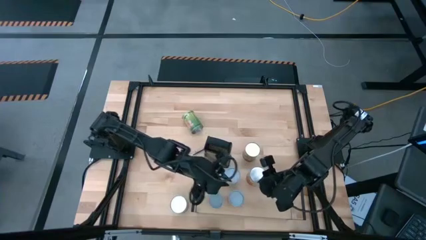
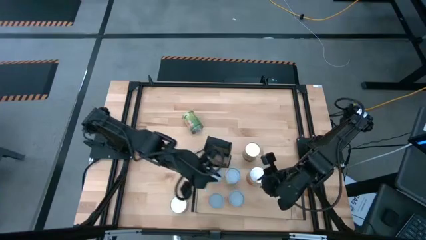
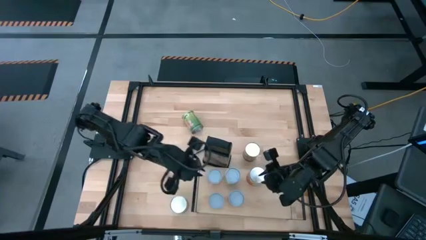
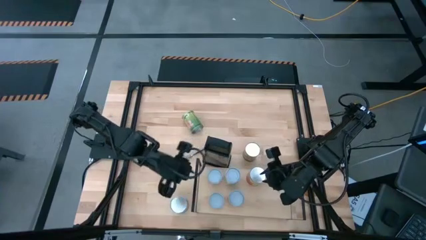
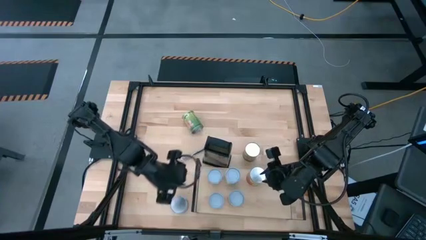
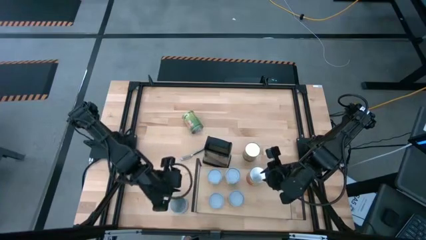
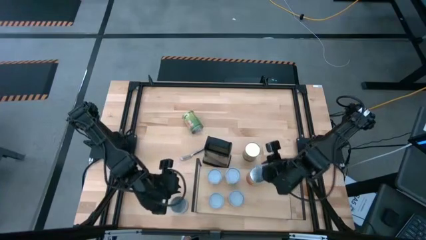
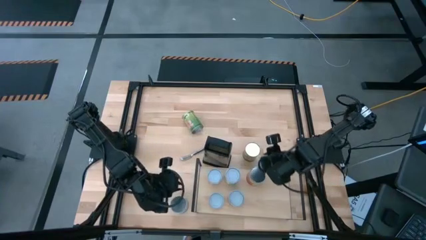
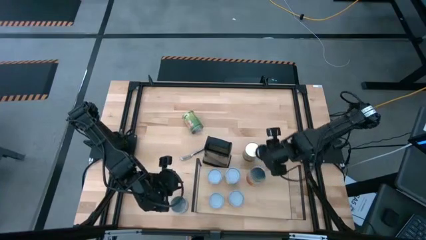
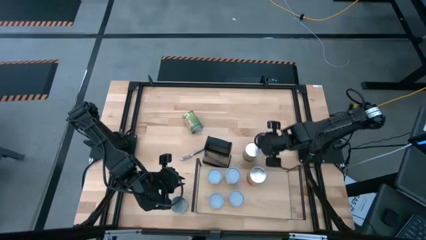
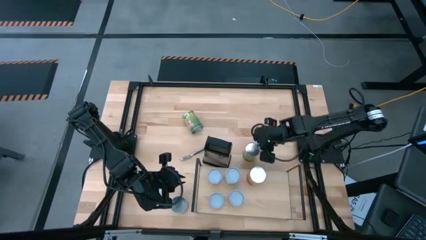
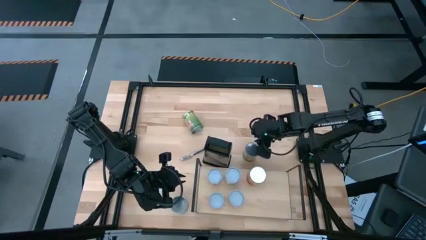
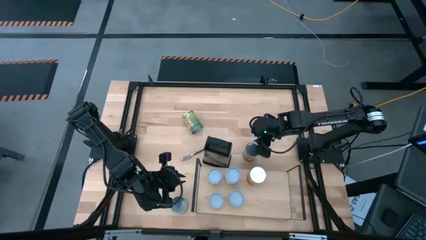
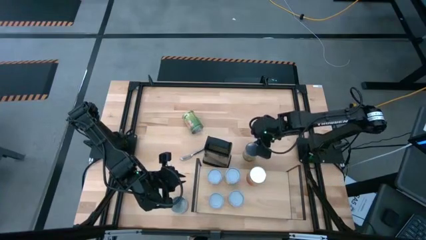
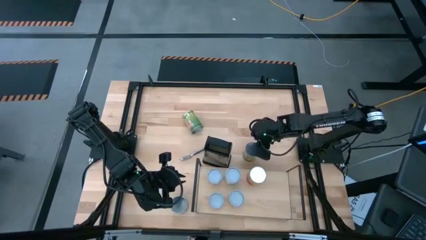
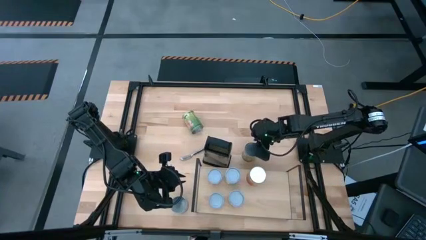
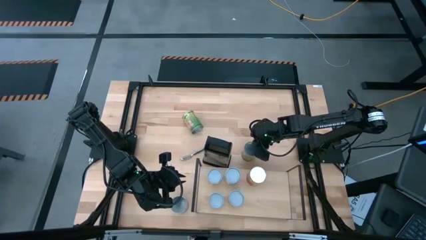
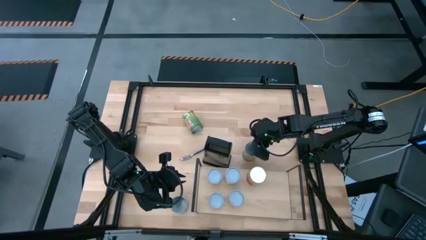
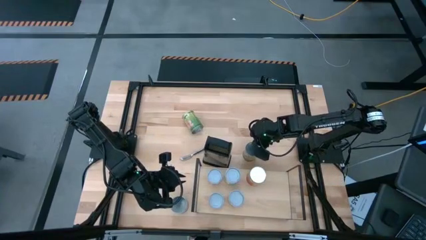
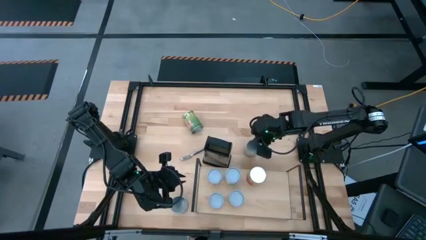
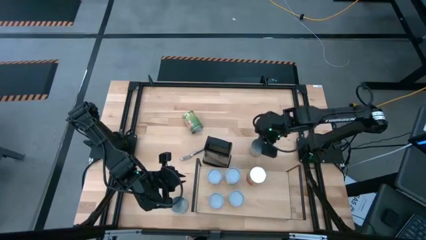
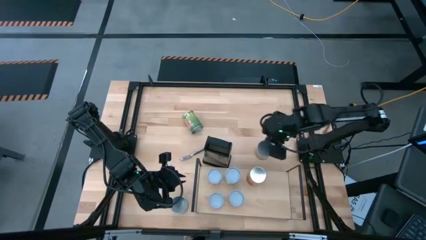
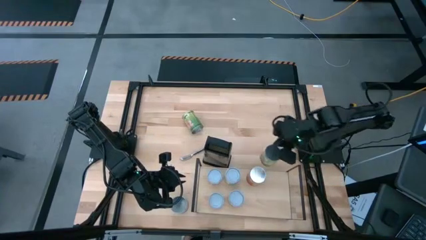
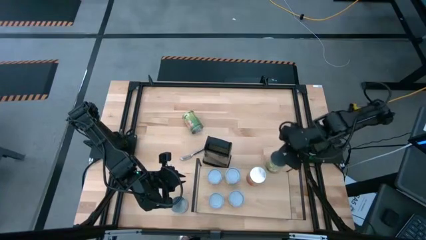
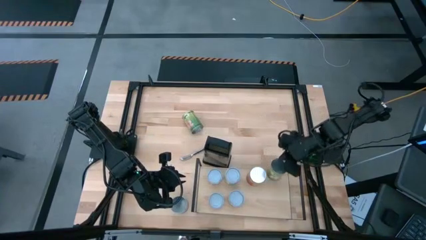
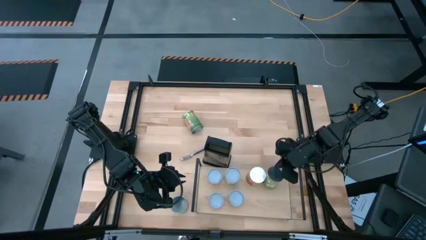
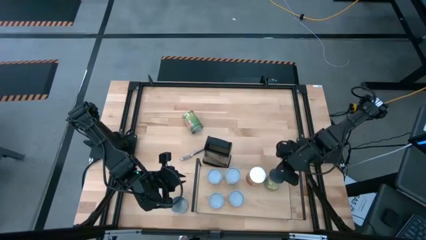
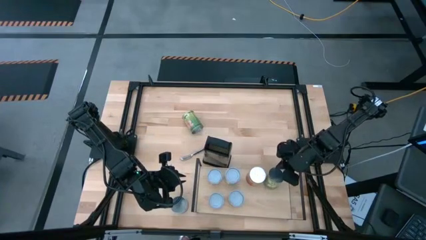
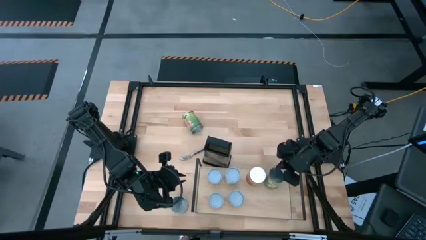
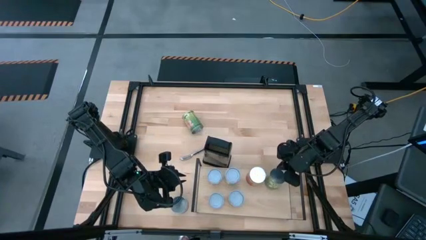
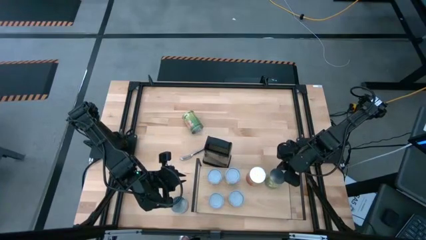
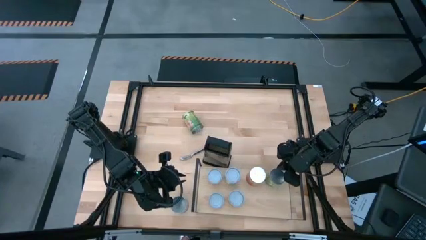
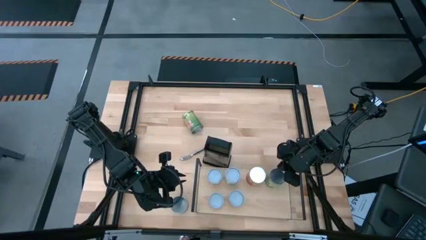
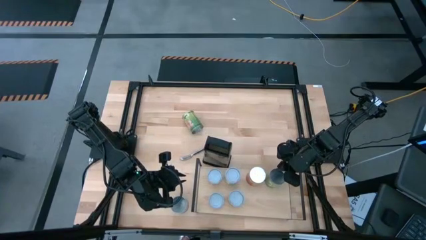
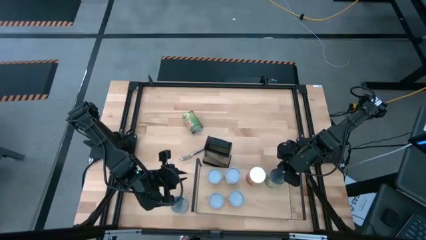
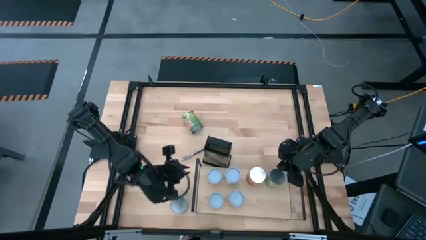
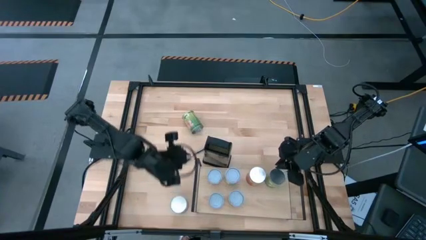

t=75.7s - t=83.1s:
Task: Pick and place cans onto a shelf
Put the canned peaches on the shelf

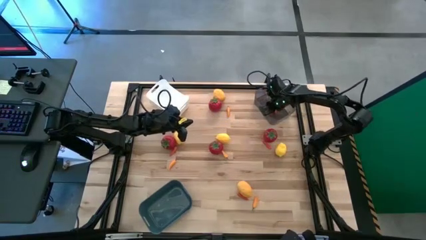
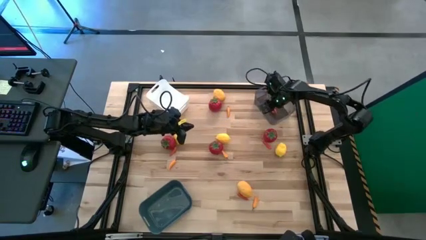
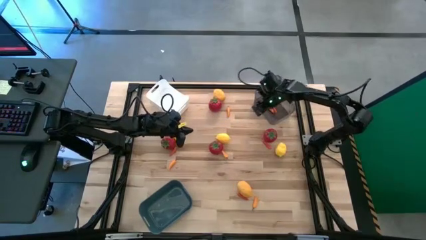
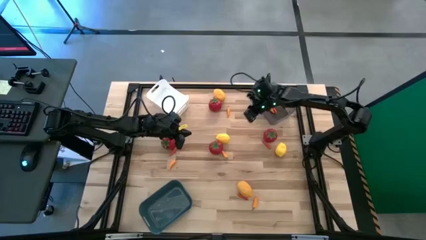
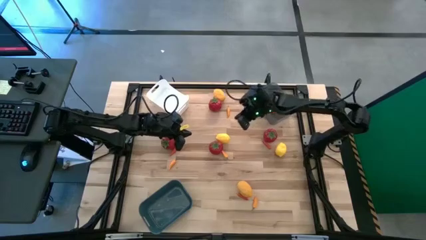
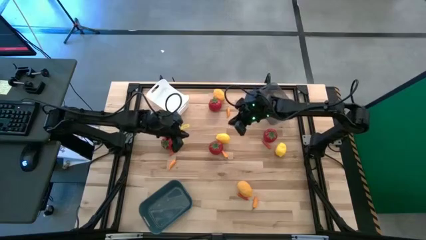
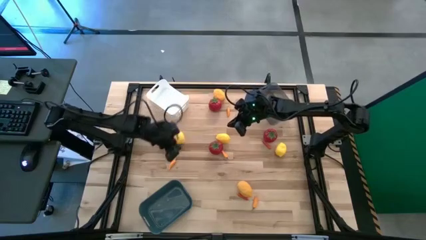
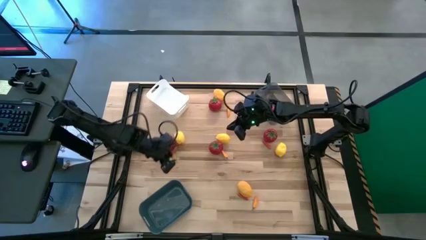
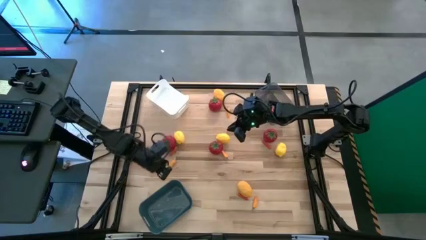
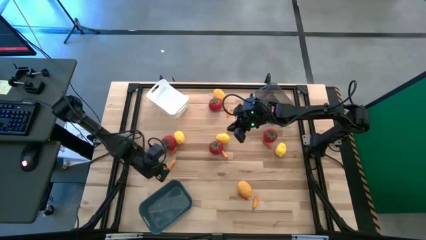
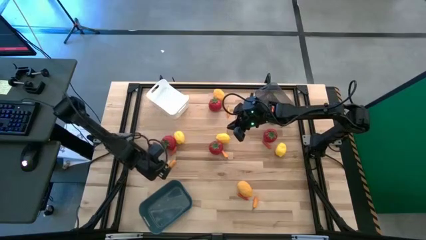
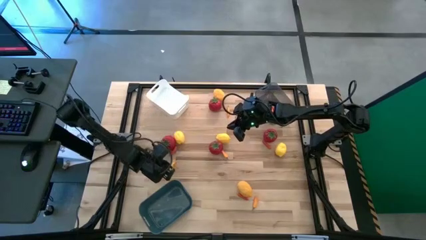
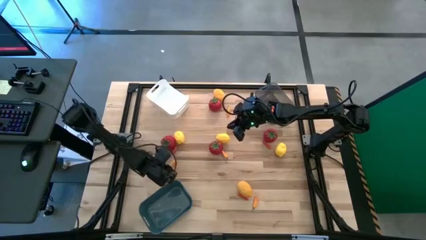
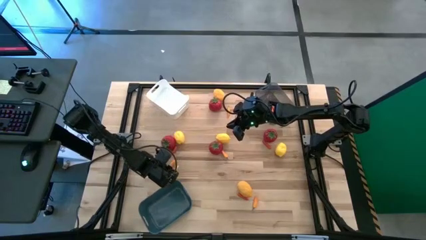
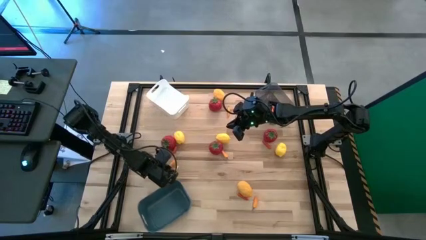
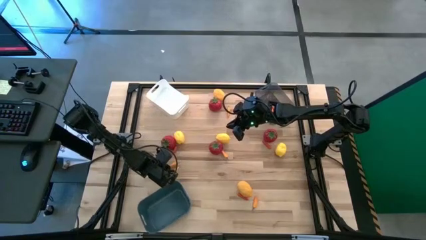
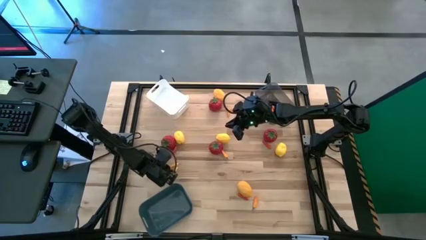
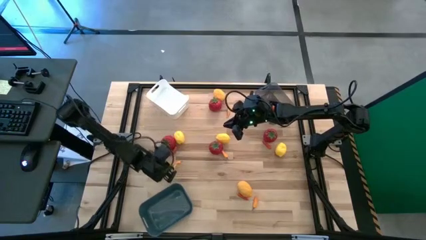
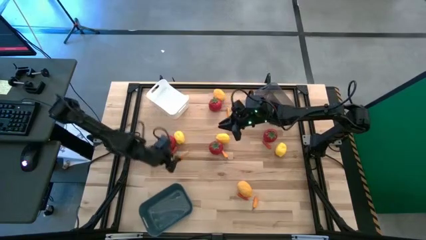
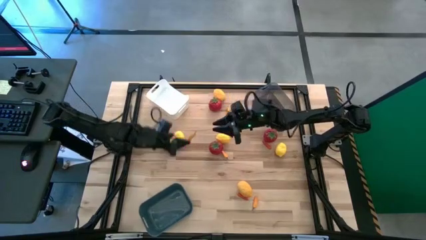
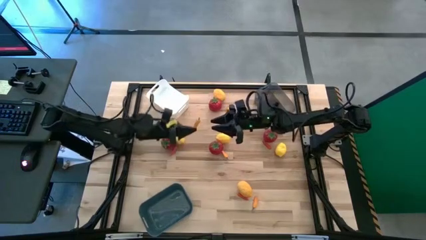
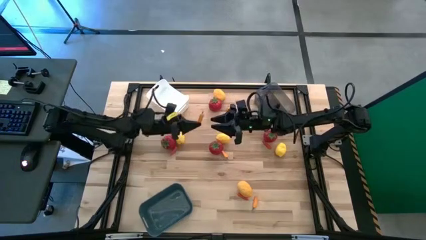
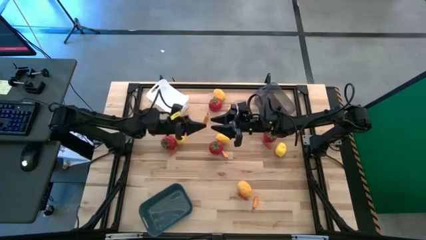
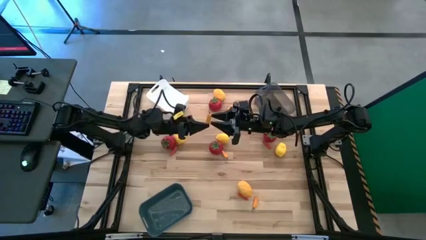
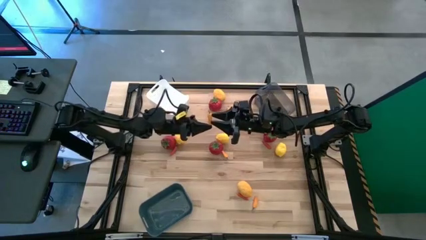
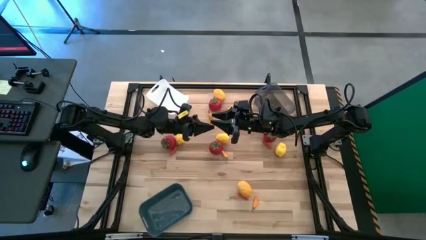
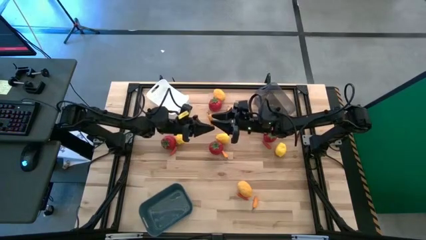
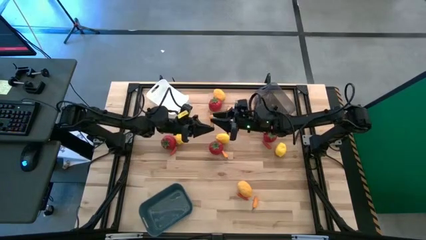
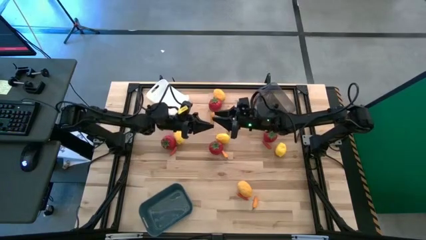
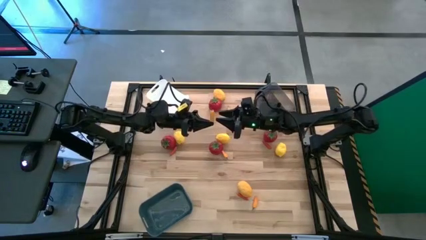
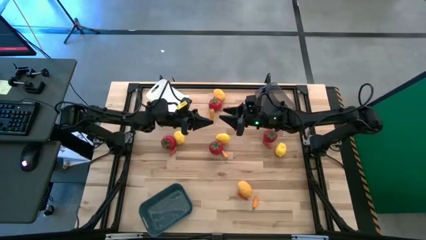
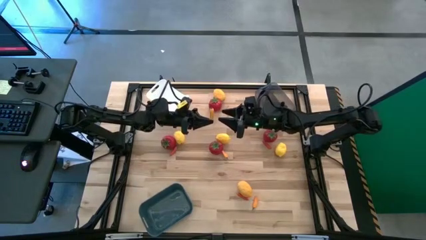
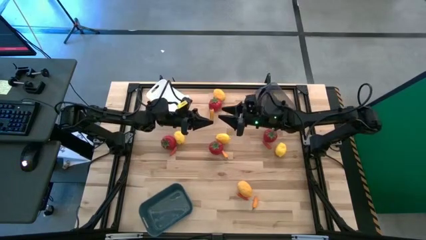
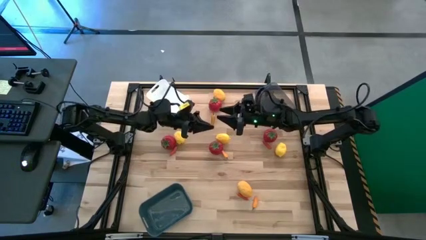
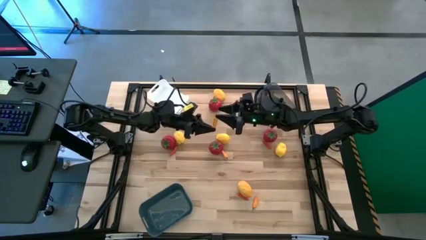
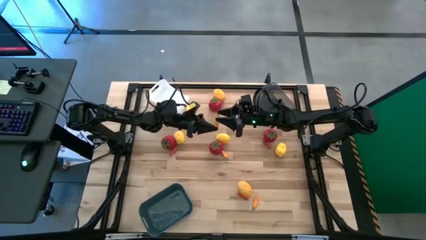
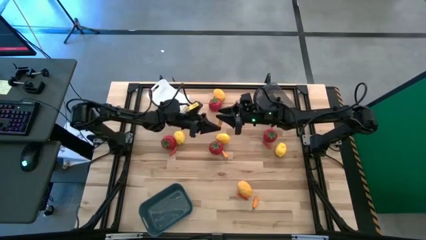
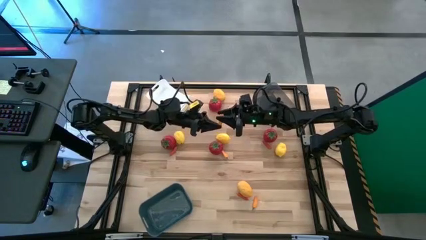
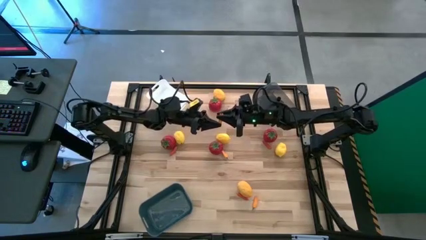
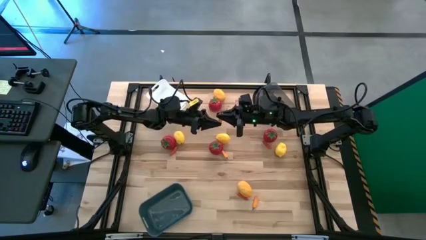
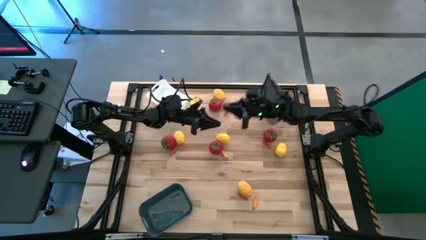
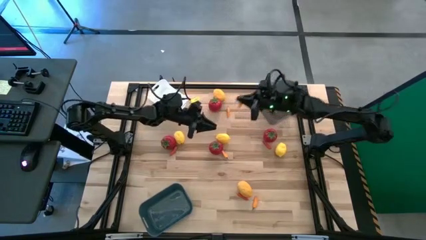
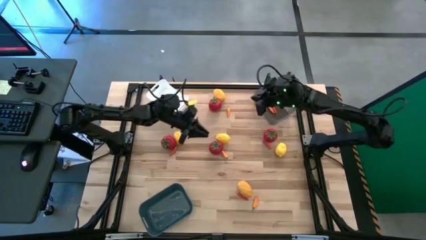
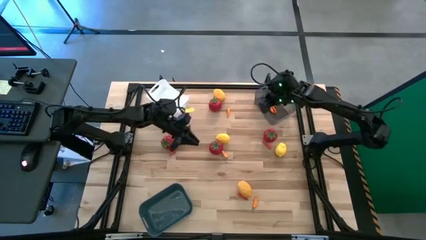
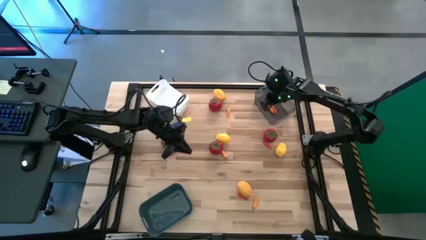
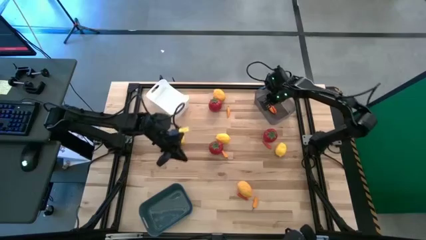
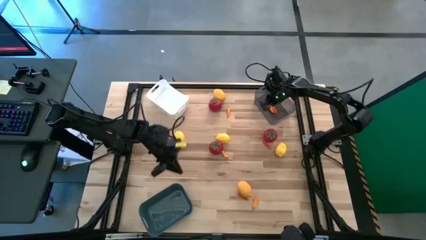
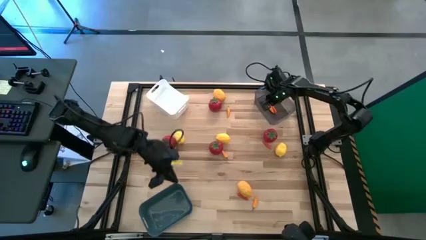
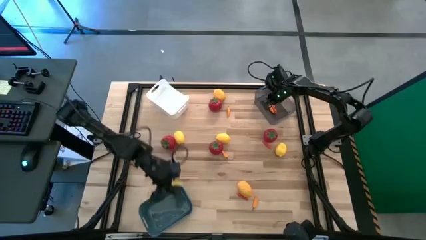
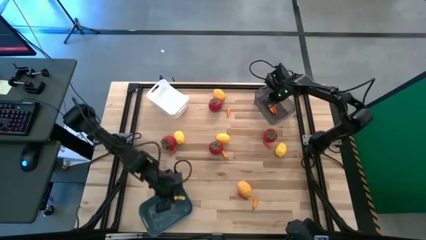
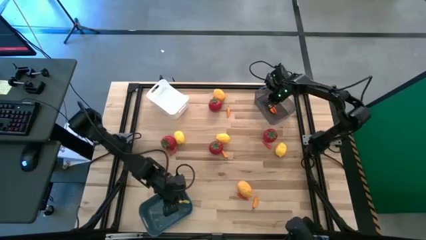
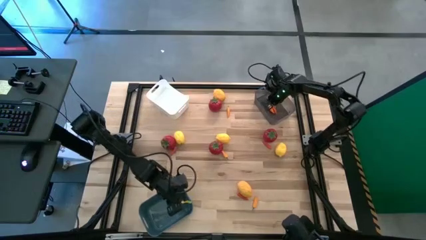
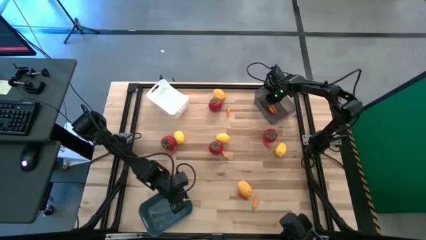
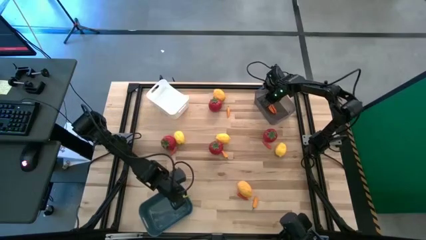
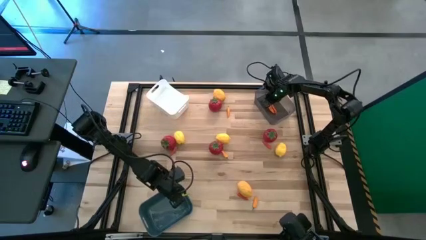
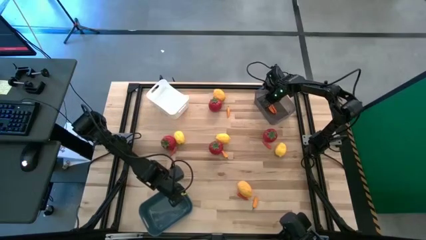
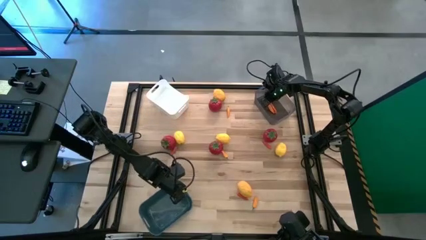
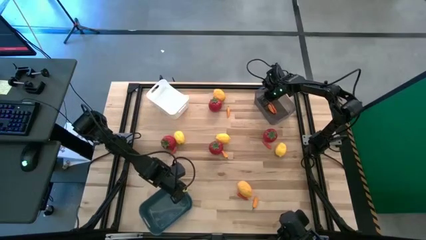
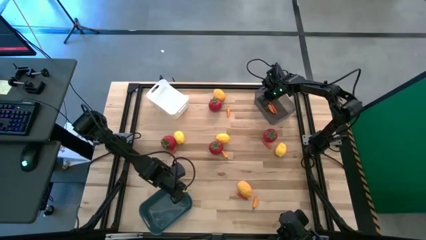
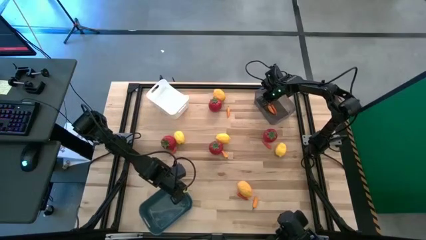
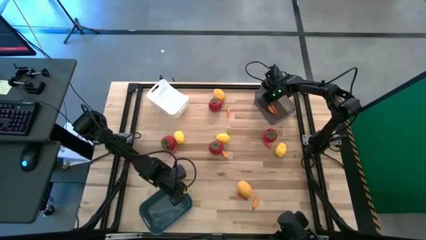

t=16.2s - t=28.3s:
Task: Sort produce into baskets
Put the orange chili pepper into the black transparent bin
